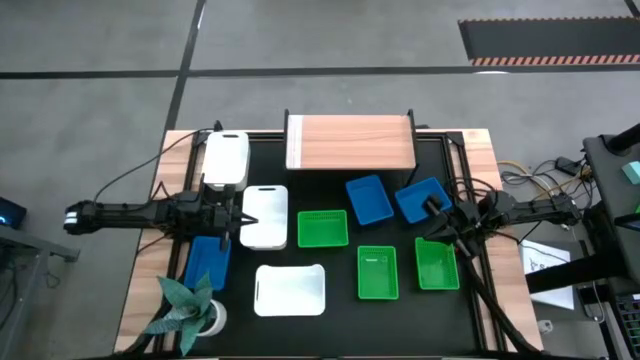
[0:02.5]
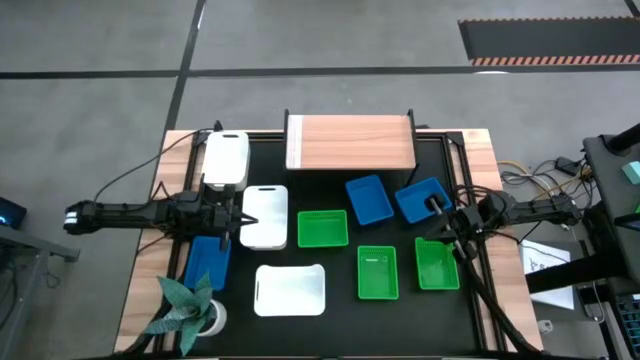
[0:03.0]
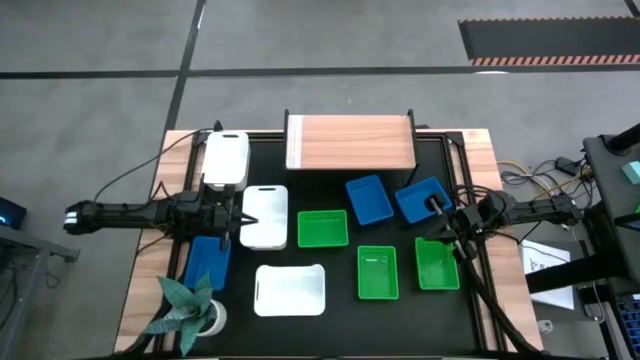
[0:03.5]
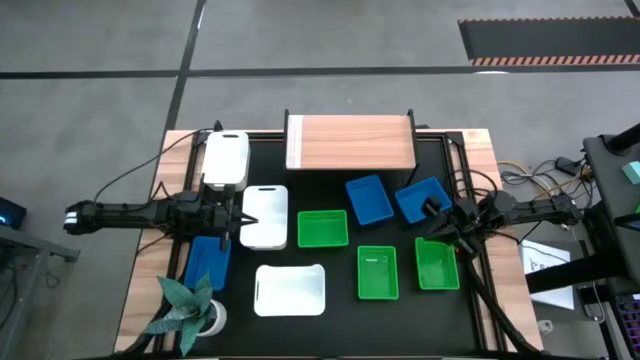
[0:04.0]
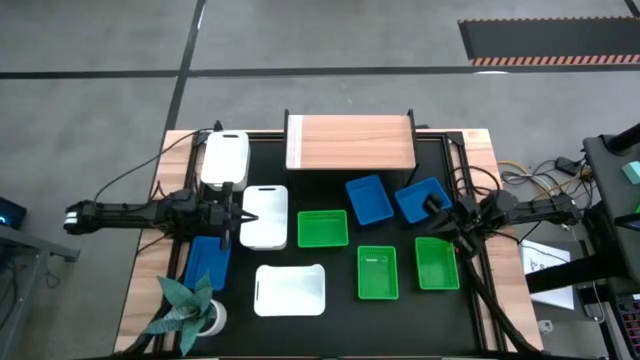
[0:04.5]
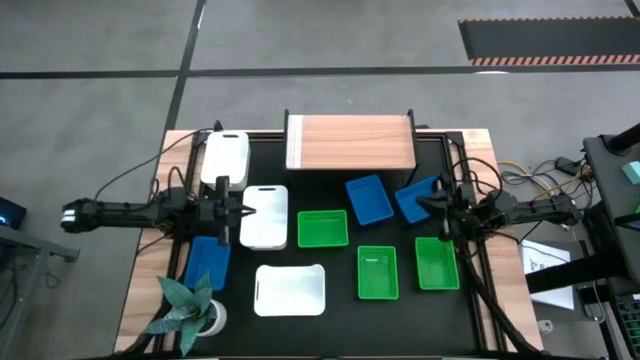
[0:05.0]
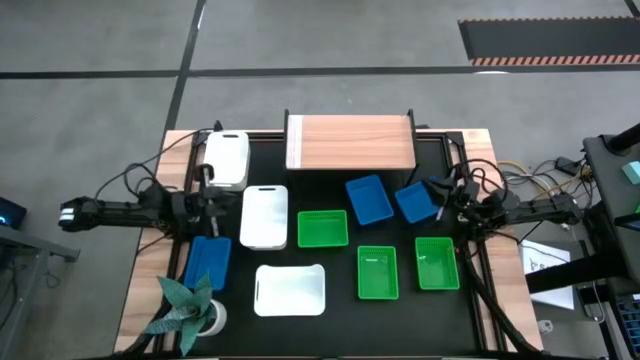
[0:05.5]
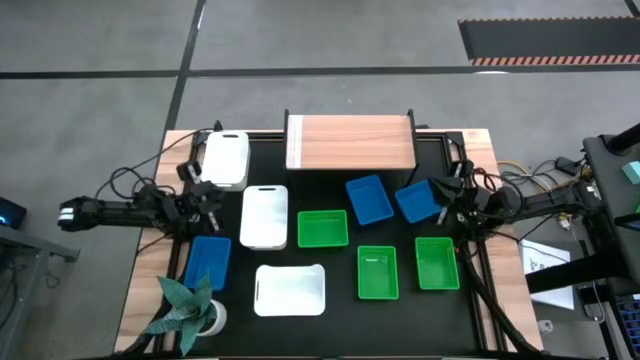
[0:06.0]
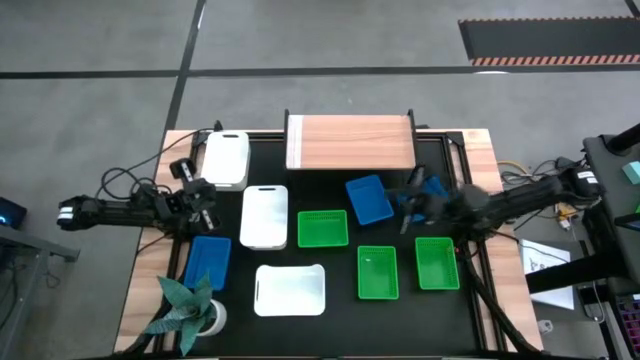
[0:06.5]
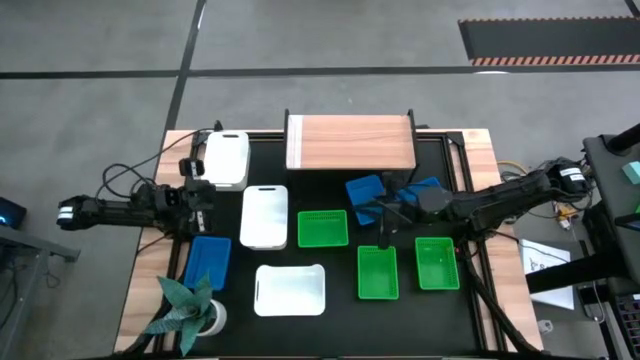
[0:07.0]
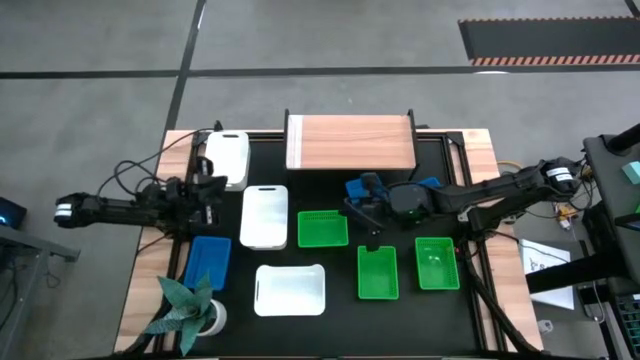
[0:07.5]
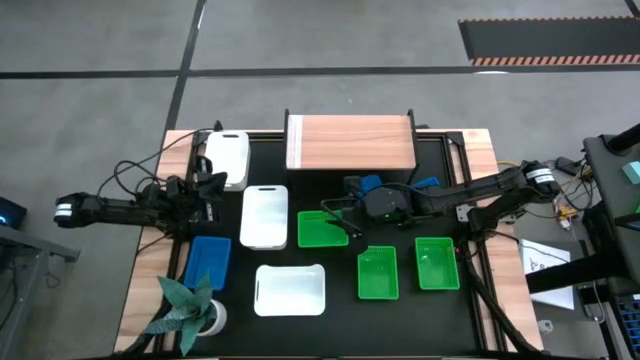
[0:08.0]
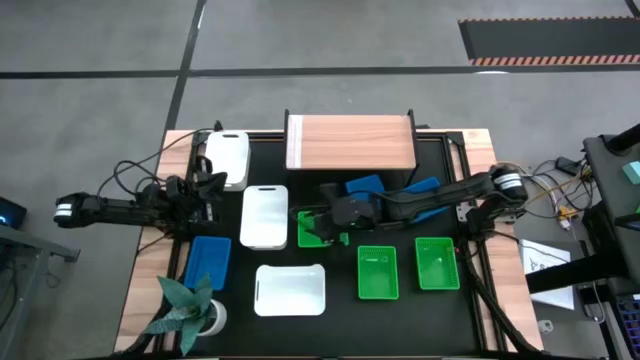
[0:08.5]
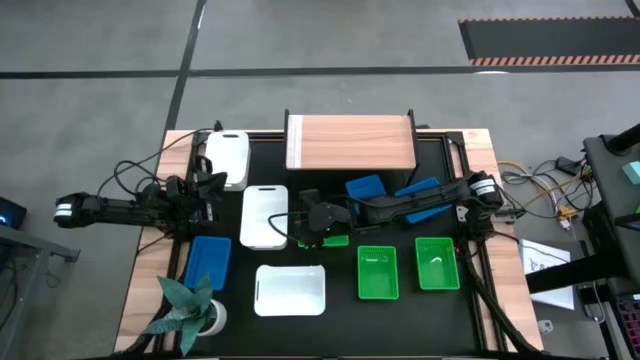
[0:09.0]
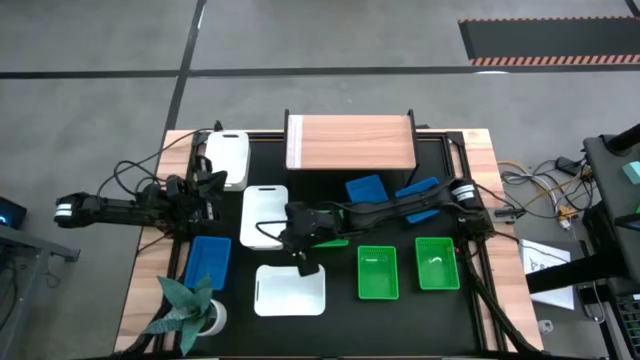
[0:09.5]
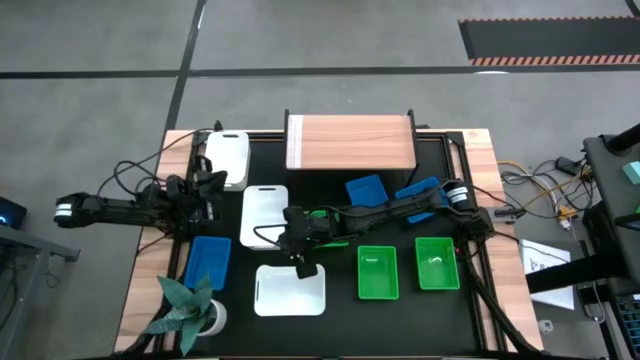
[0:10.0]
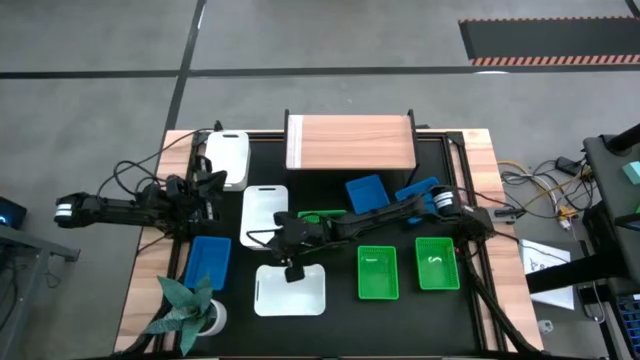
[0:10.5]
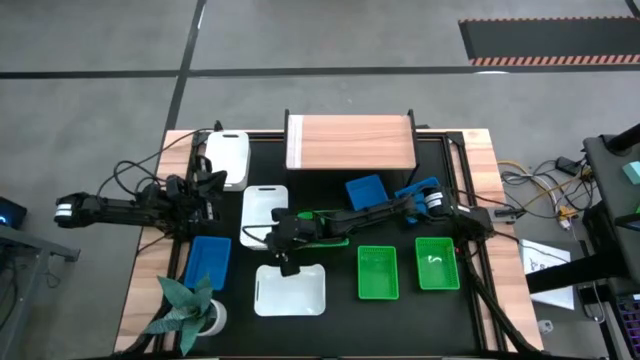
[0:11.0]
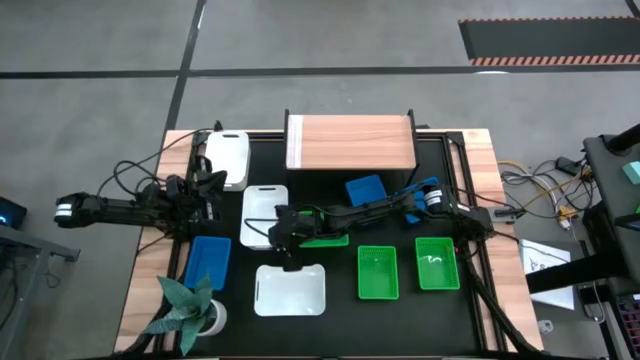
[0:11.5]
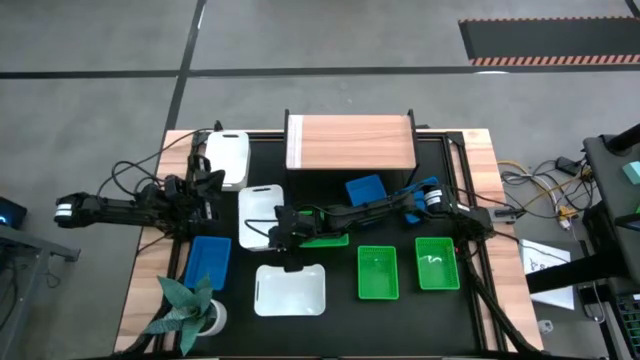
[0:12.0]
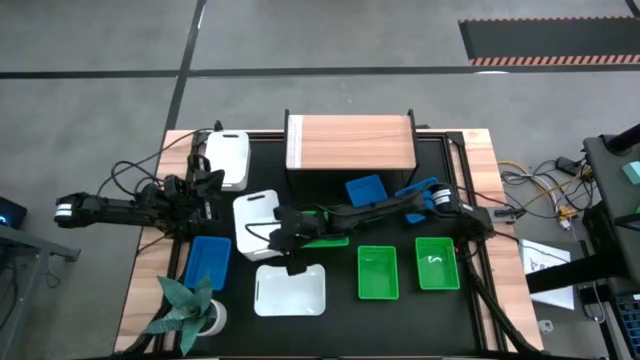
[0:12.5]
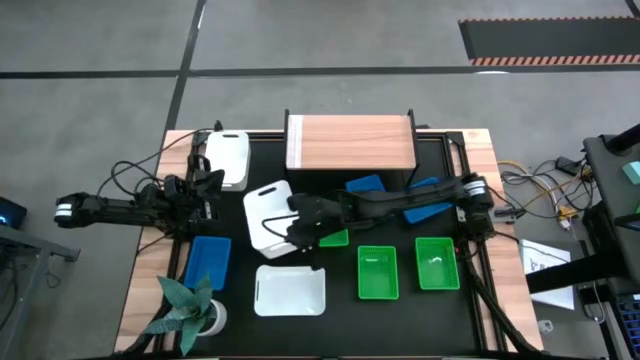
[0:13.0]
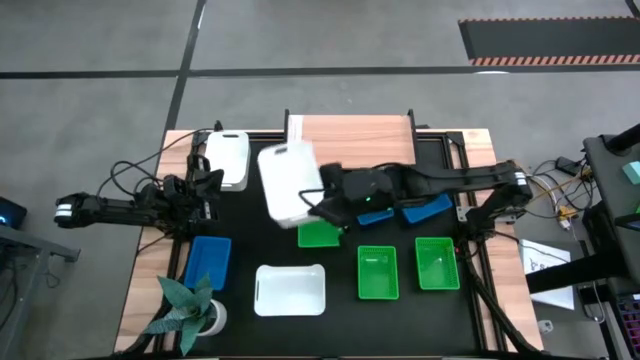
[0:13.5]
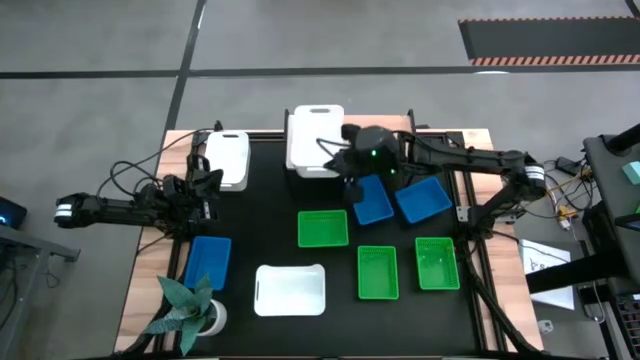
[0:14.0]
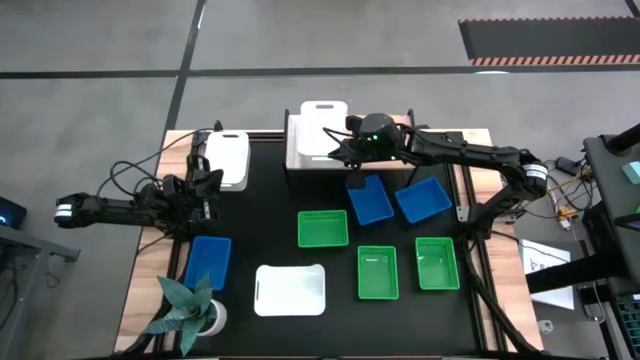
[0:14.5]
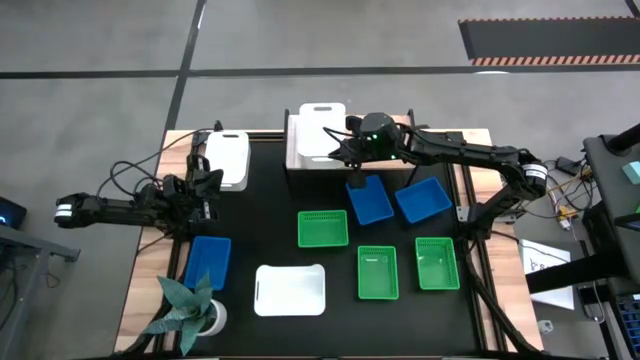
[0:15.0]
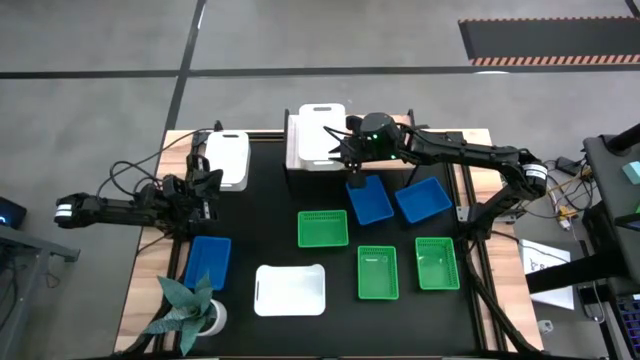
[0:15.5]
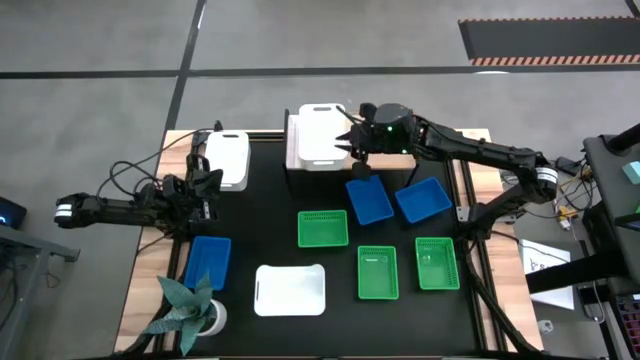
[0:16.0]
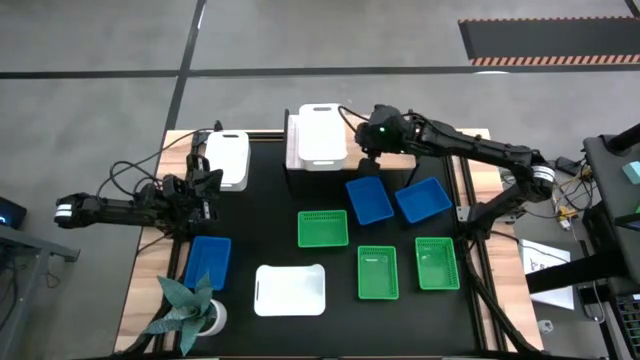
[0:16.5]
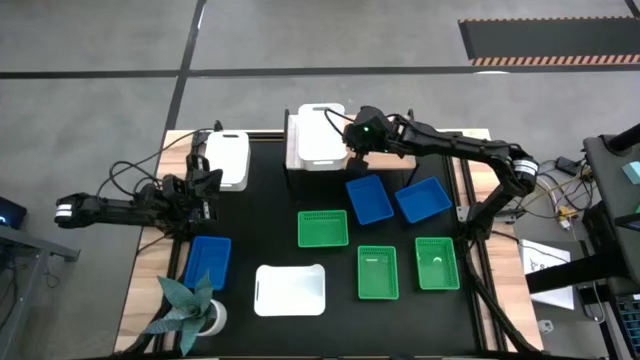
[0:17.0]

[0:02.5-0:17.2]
Task: Stack baskets on shelf by color
Put the middle white bin on the shelf

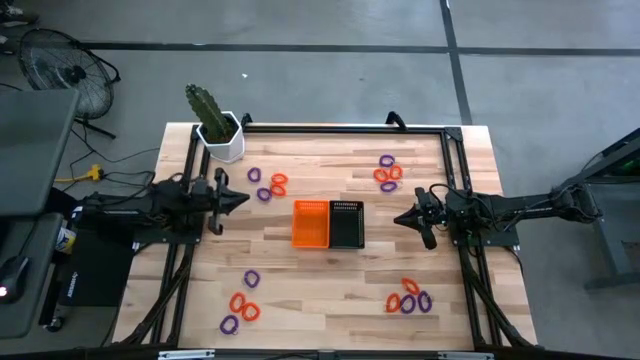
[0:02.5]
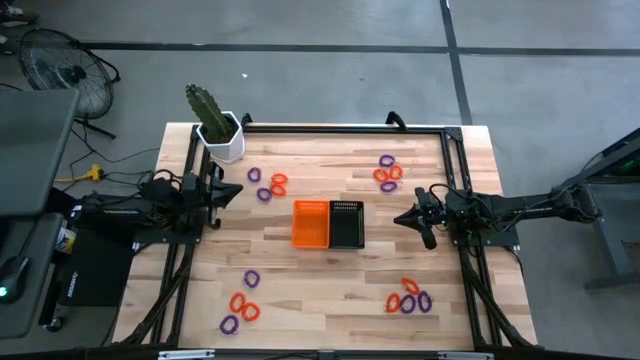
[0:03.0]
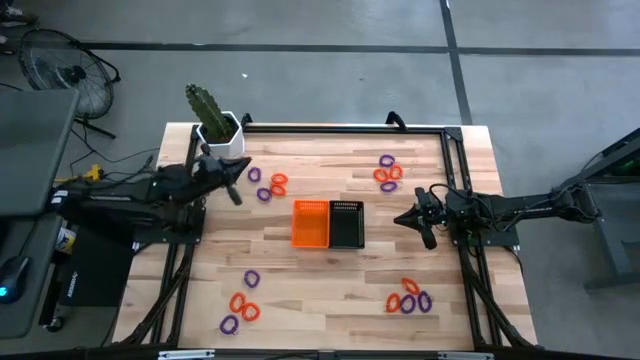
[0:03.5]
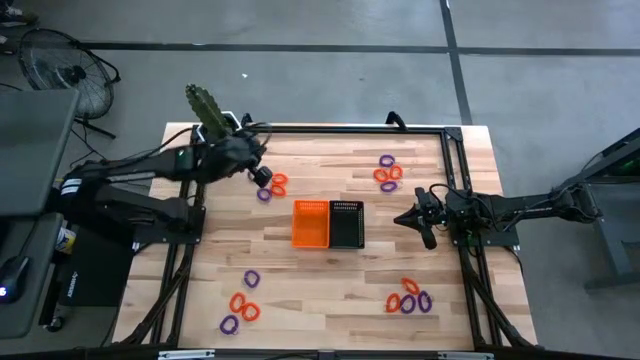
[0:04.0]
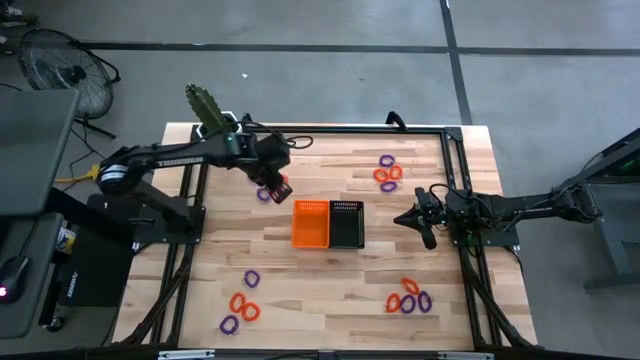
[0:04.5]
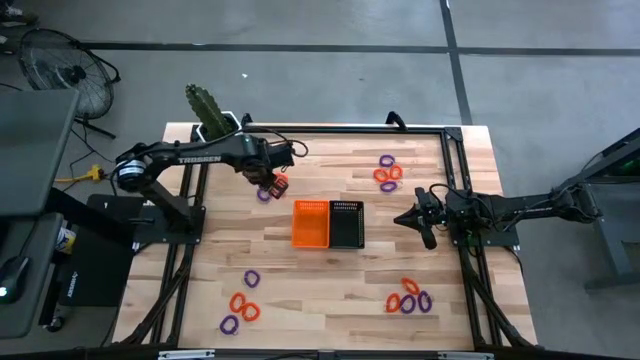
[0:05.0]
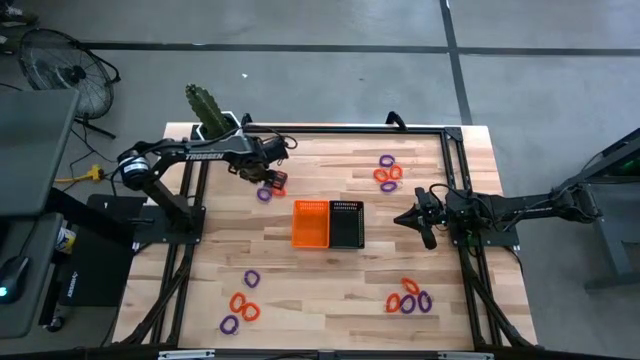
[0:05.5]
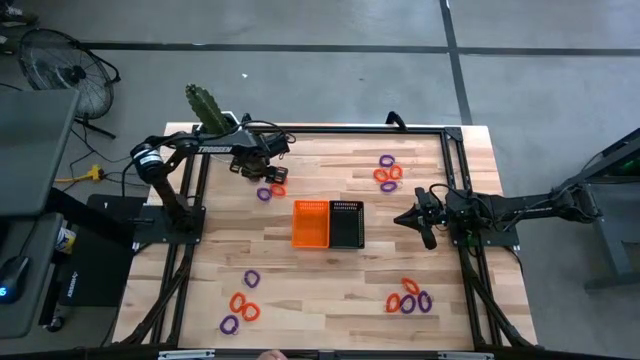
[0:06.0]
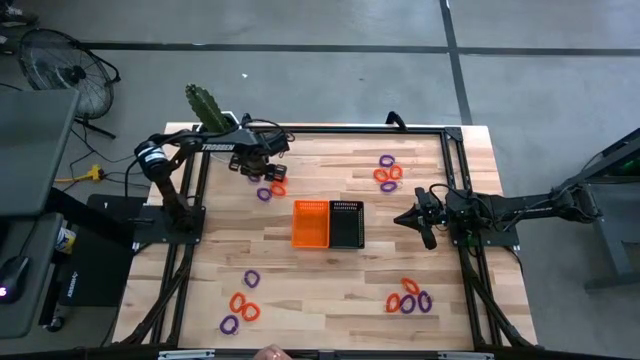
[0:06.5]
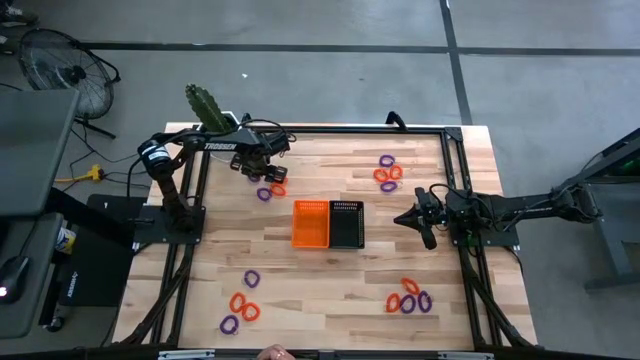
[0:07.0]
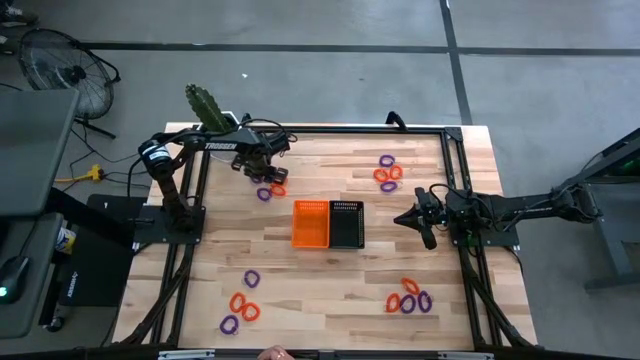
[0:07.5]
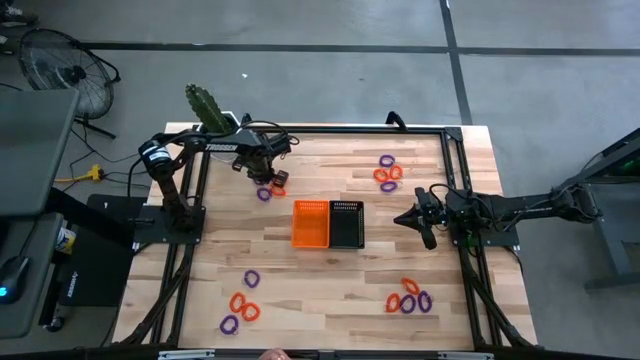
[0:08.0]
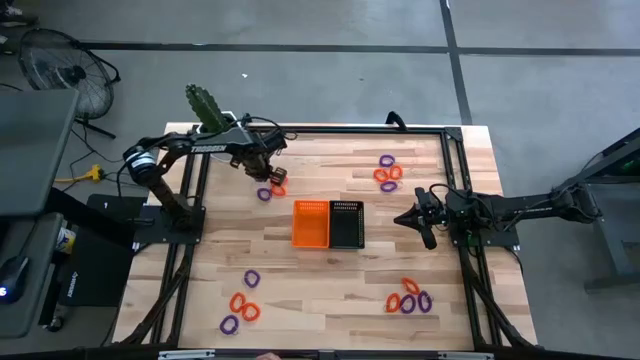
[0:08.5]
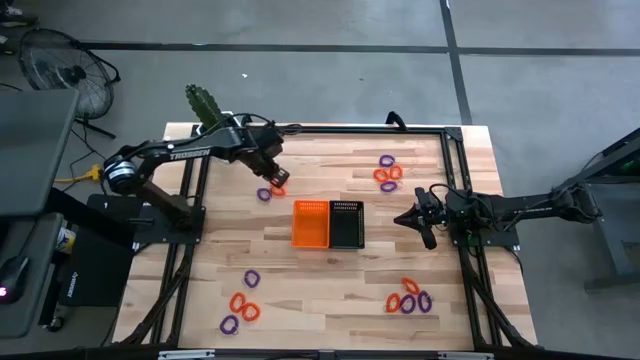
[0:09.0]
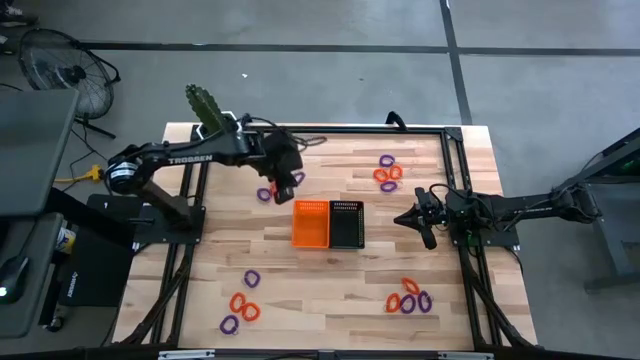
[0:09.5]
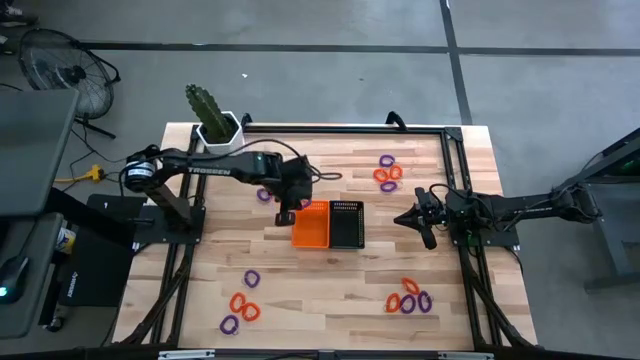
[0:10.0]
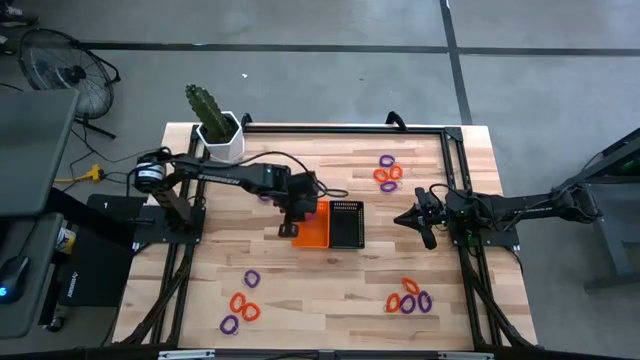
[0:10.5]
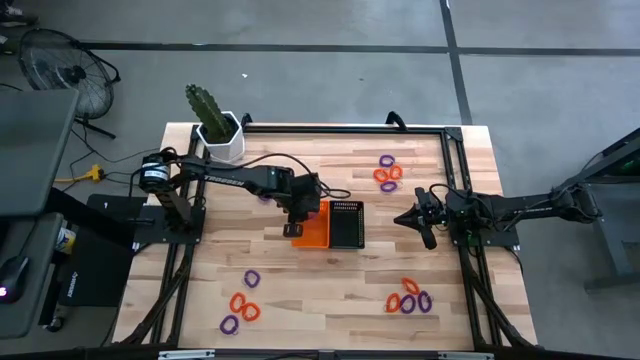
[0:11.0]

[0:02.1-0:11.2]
Task: Sort spring keychains
Put the violet spring keychain into the orange bin
